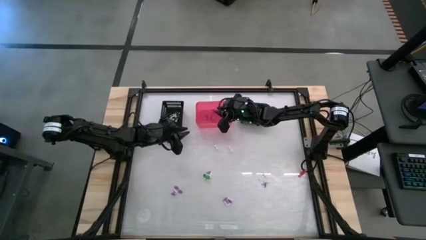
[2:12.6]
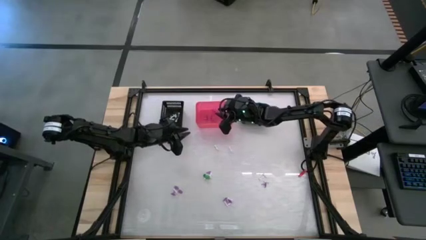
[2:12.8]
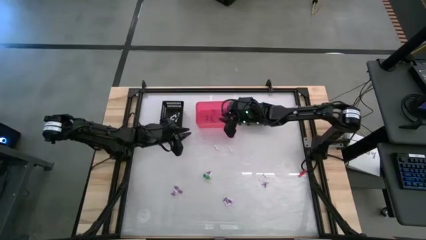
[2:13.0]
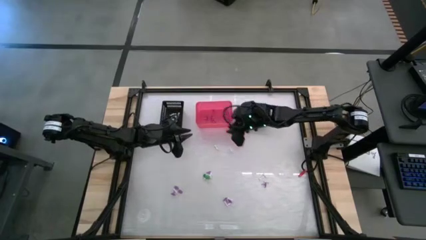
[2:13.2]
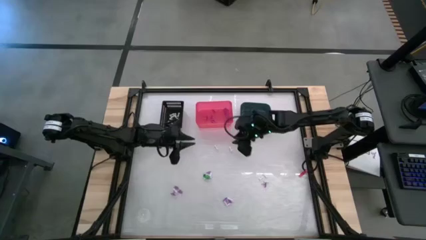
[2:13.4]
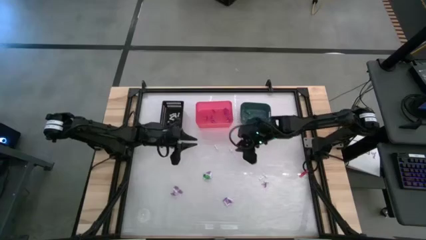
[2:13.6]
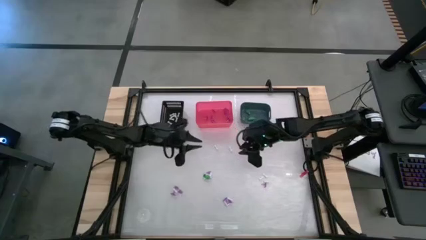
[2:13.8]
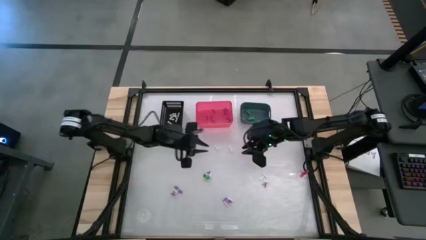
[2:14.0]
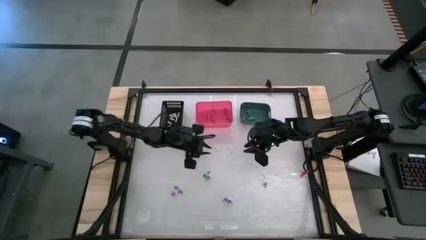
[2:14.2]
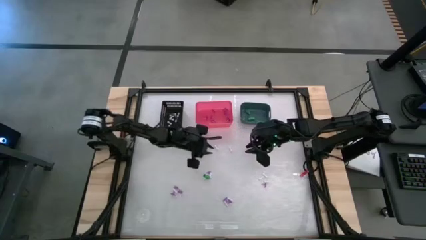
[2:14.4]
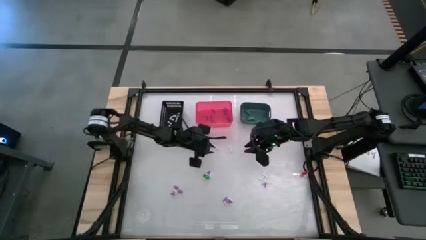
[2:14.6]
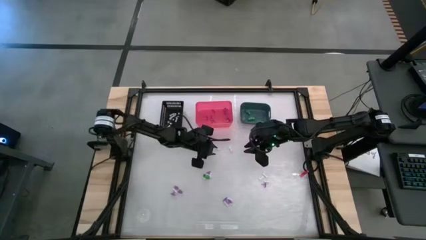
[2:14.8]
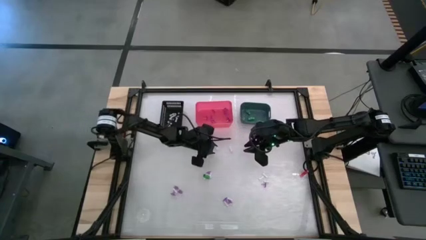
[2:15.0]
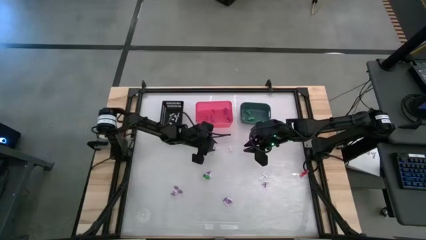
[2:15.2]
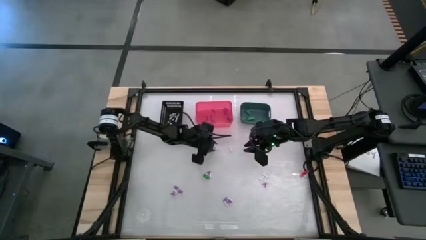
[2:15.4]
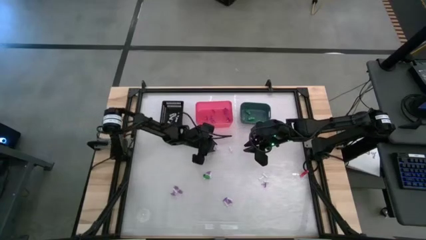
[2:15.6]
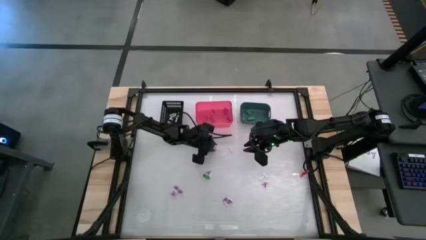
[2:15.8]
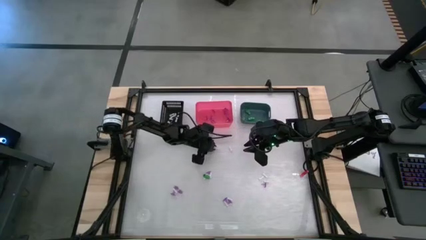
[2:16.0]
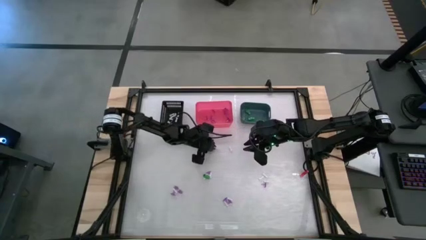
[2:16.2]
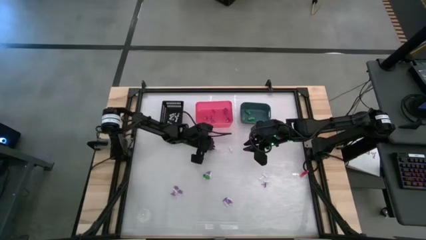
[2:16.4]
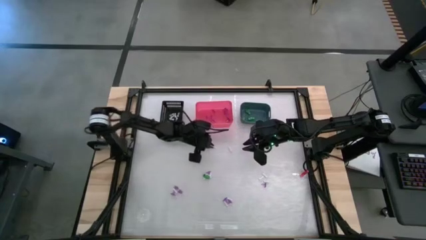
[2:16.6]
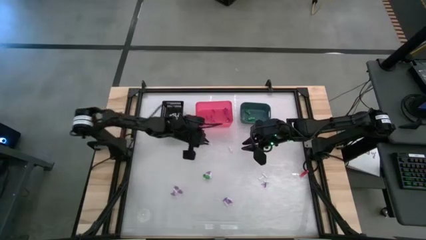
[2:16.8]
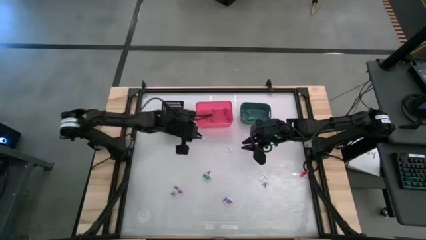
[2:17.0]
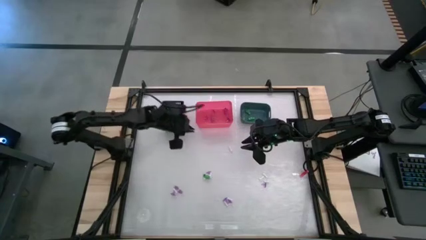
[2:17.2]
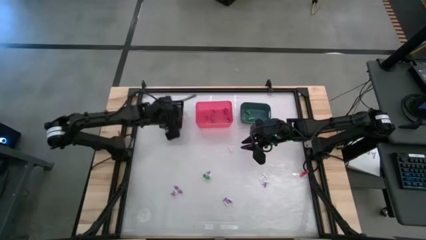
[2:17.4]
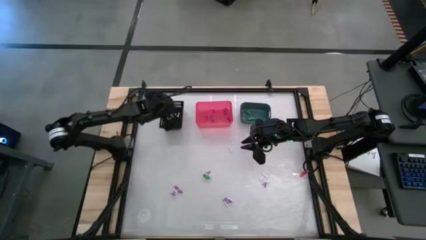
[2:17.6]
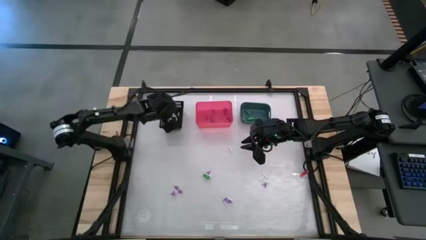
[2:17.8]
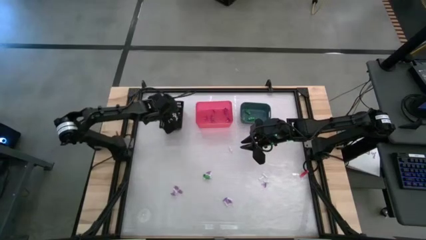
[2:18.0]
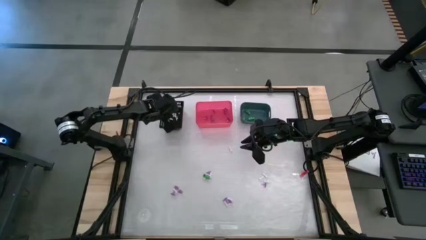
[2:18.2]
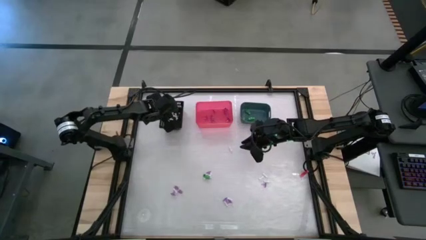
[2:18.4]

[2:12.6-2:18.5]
Task: Sort Halloween decoration
Put the white bone toy into the black bin

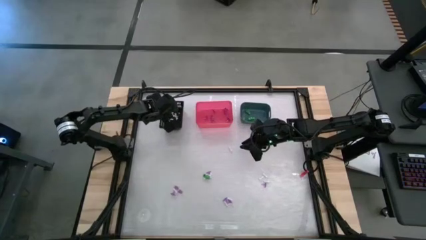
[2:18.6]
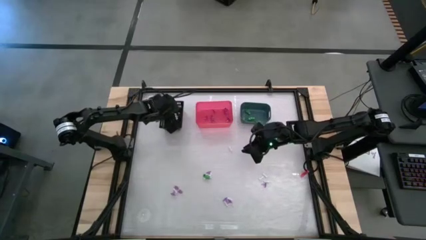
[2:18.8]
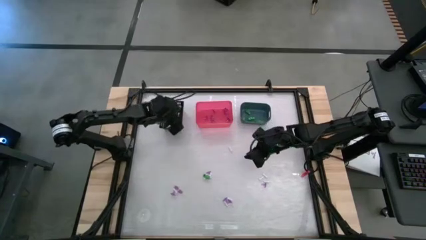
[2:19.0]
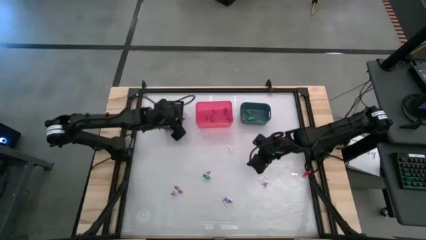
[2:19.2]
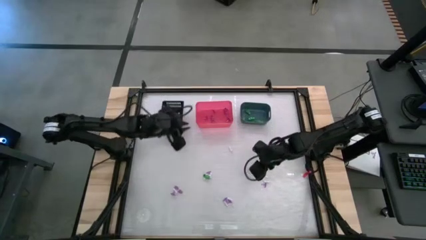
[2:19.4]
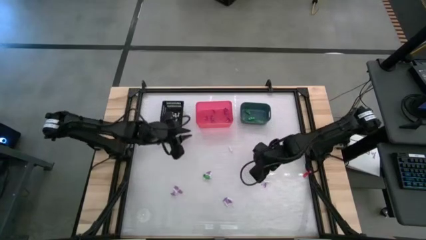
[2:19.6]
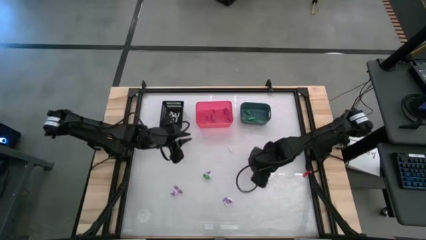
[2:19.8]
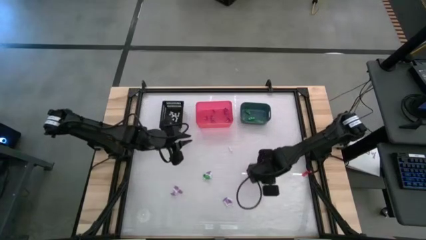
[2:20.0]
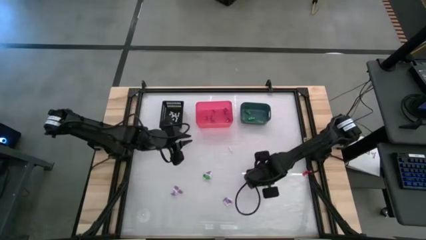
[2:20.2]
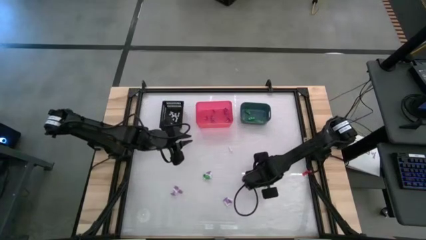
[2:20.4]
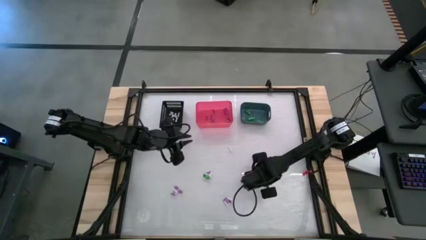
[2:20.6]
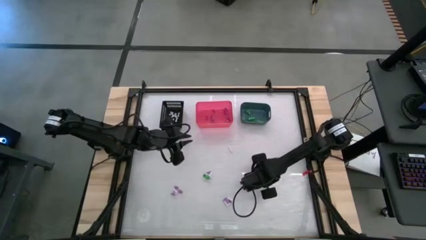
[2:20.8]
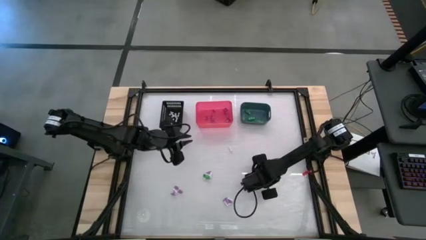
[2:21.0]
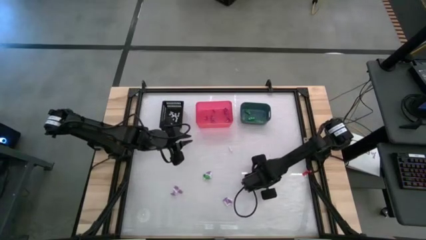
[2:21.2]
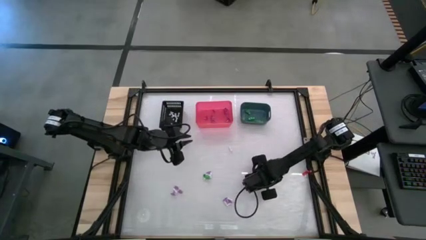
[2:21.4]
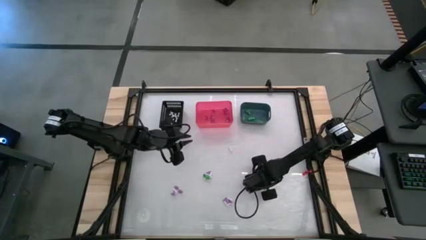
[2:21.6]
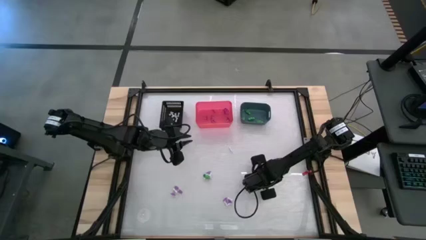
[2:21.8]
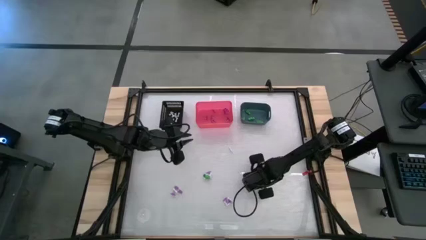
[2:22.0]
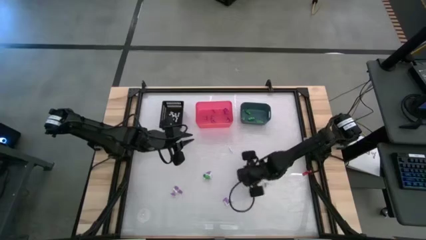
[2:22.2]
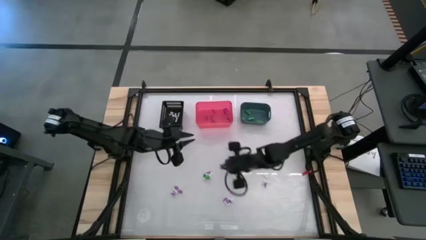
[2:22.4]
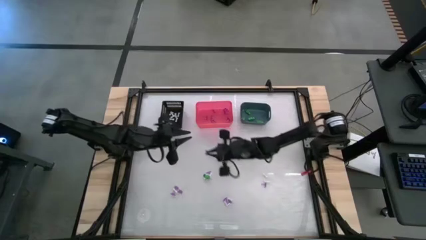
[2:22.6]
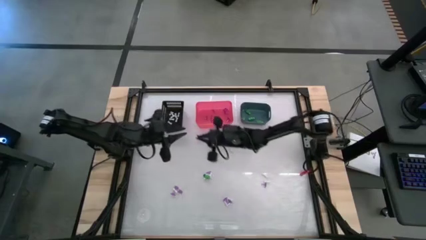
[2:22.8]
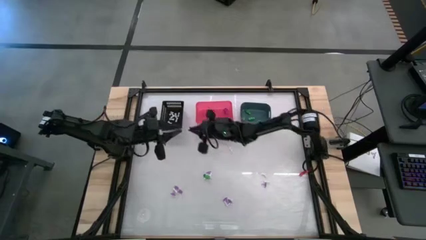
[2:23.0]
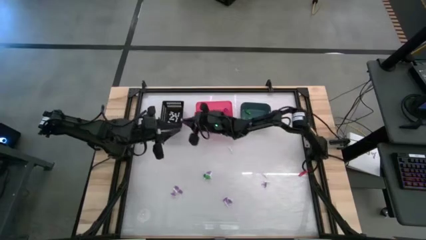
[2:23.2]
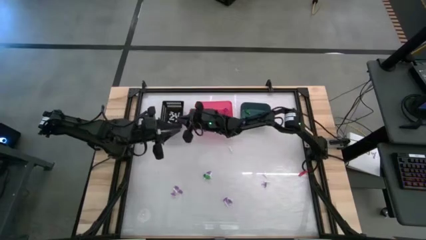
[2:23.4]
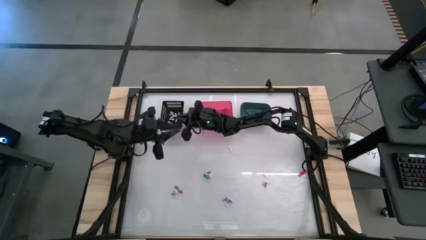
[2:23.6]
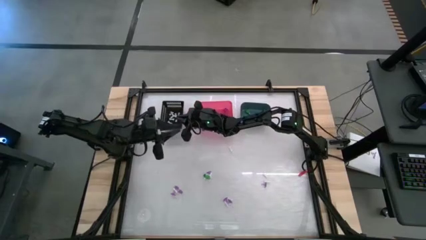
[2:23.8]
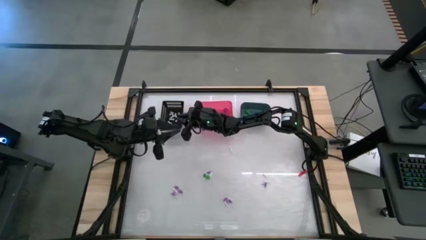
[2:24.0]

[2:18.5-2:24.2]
Put the white bone toy into the black bin

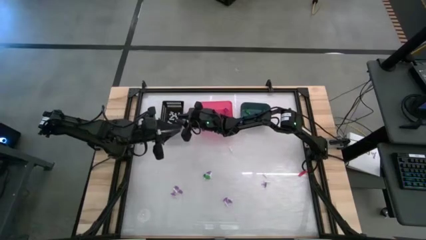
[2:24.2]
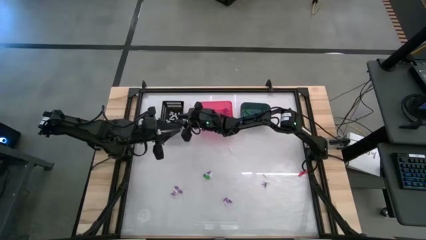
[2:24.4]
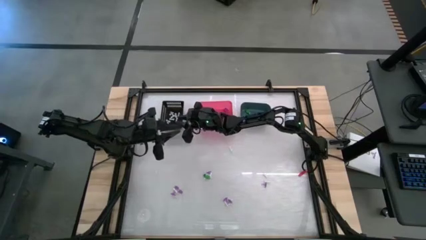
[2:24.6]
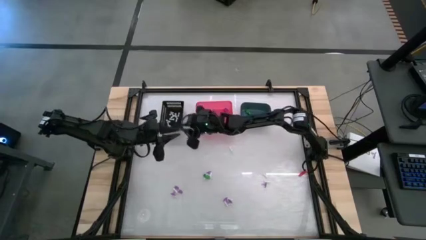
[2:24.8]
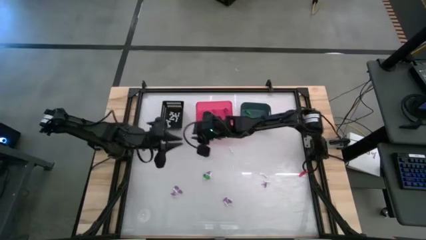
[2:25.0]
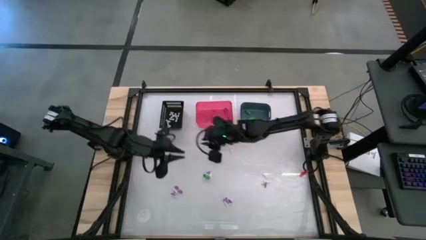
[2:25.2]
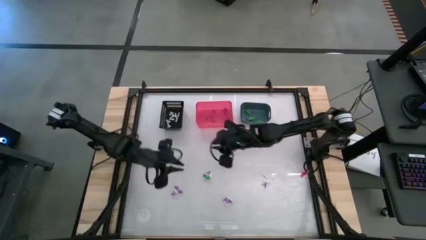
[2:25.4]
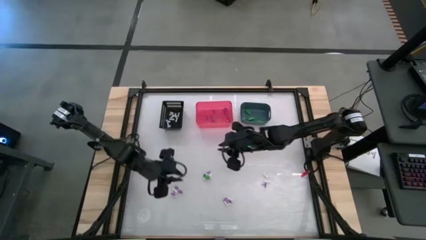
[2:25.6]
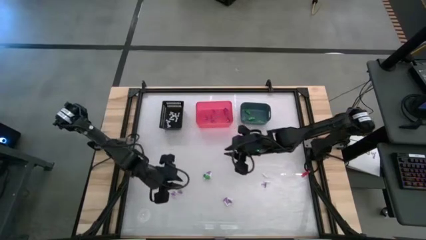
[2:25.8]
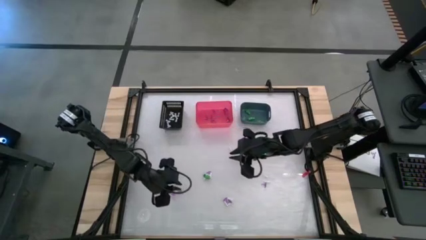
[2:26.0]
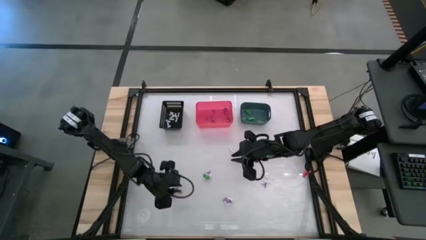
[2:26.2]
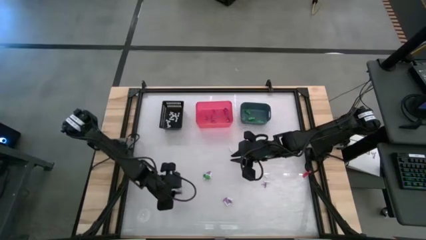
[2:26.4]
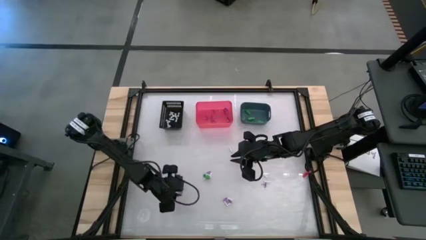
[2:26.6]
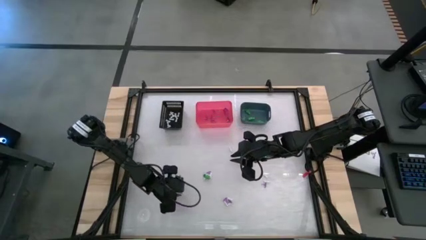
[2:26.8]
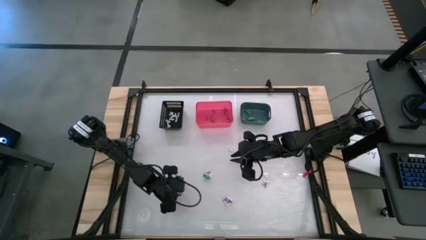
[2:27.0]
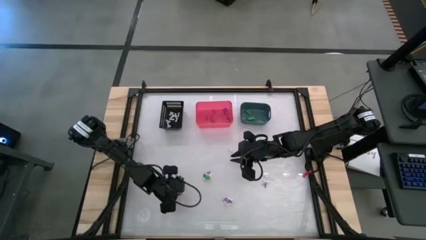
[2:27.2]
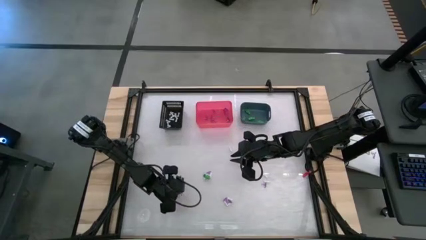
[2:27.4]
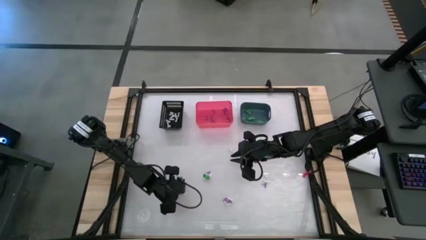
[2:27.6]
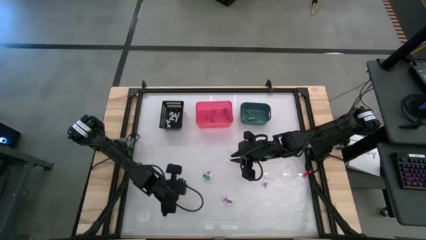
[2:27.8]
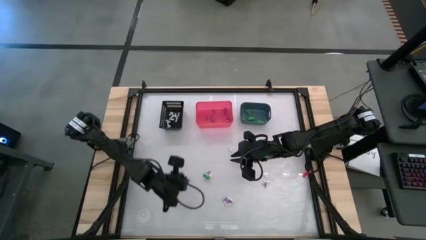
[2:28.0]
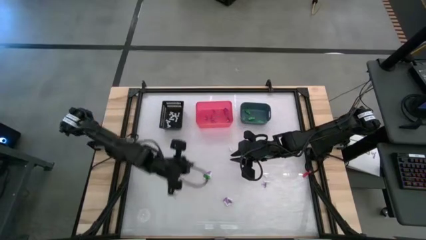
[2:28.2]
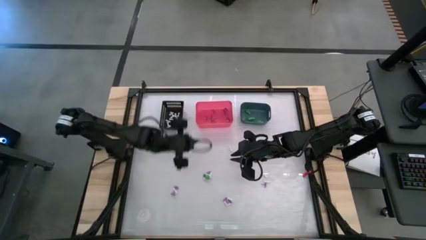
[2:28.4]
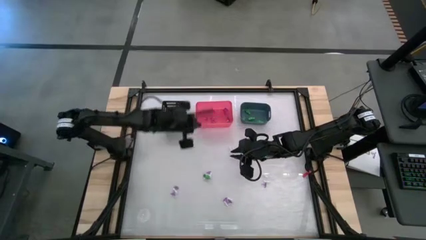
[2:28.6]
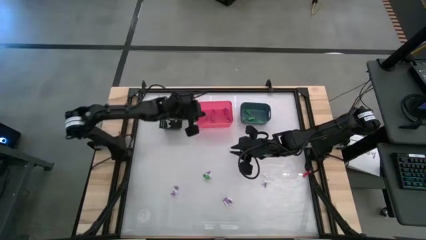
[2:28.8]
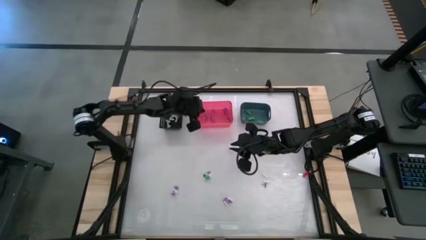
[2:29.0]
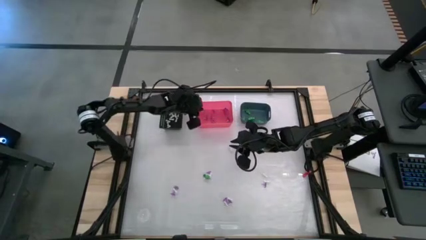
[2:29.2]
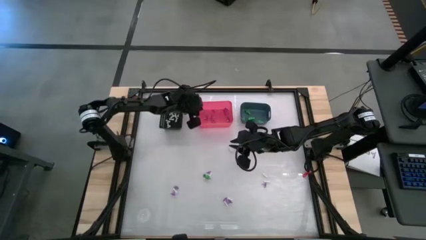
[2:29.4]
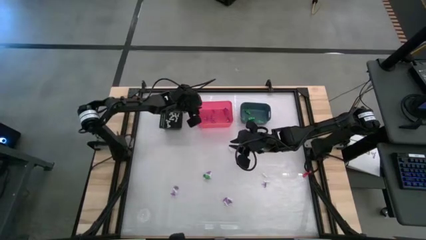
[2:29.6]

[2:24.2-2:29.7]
Put the purple hat toy into the pink bin
